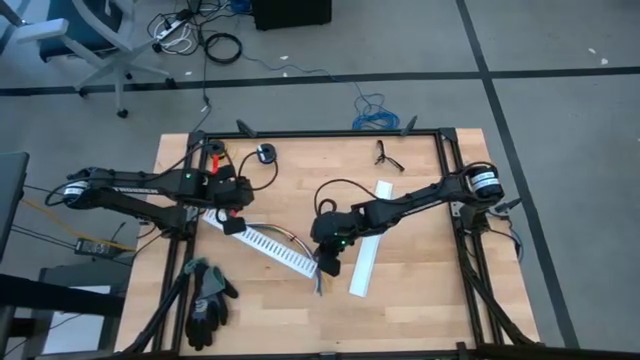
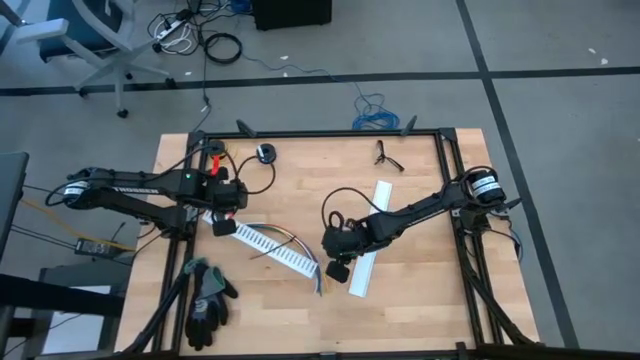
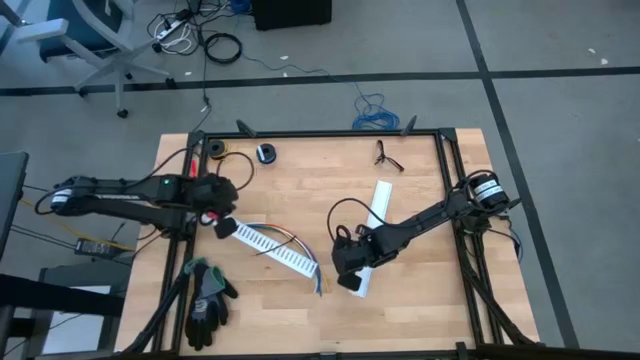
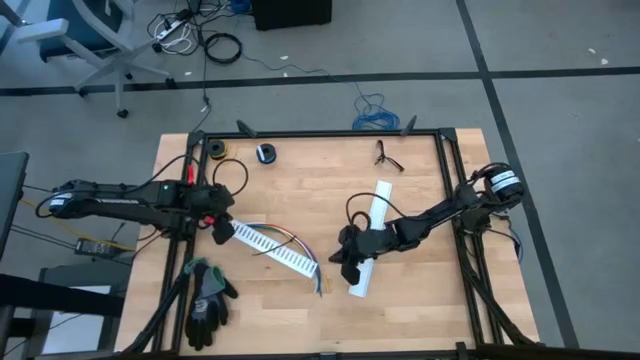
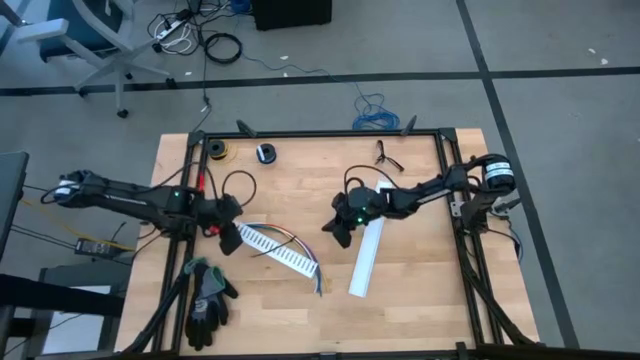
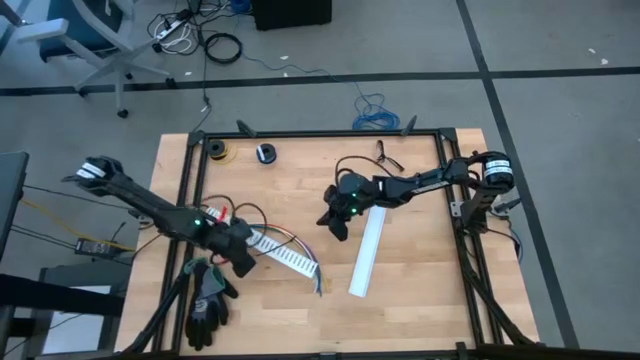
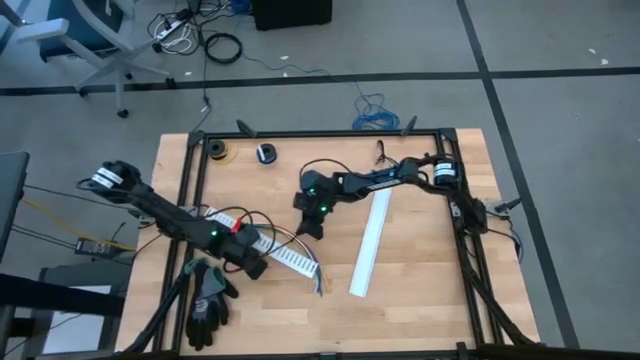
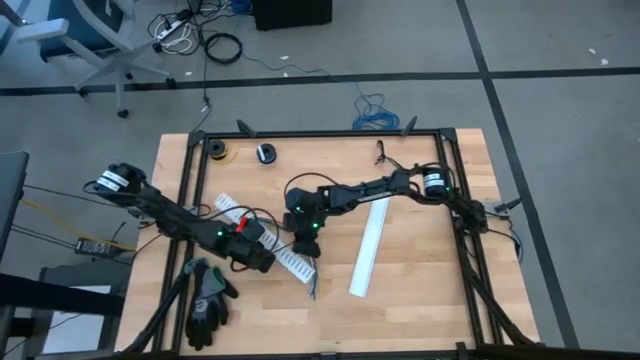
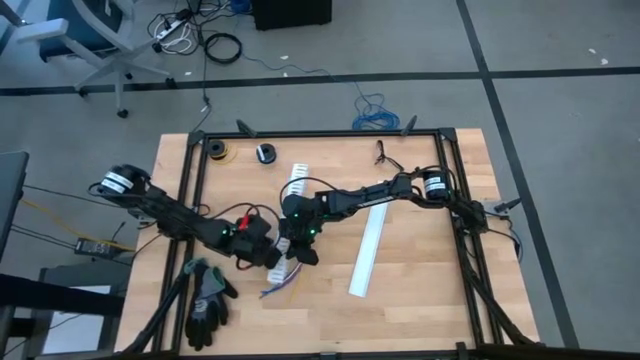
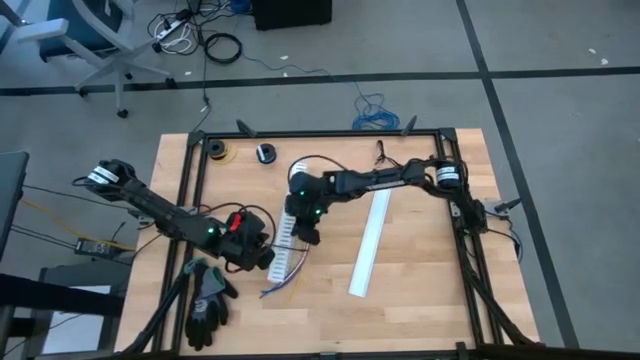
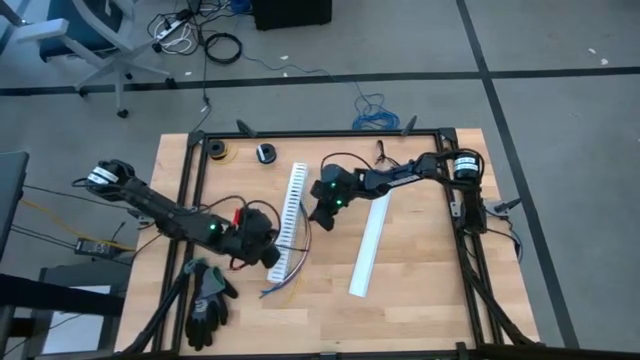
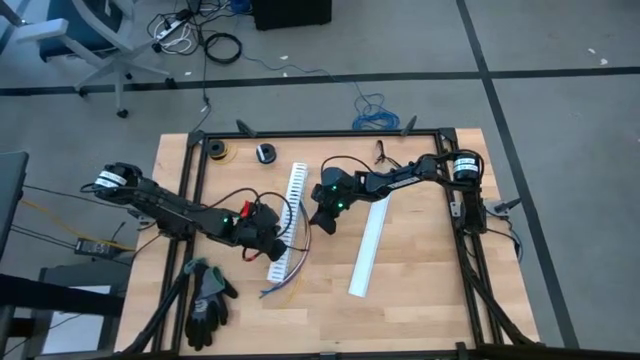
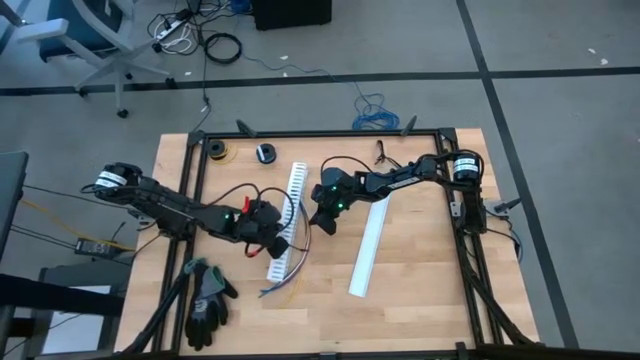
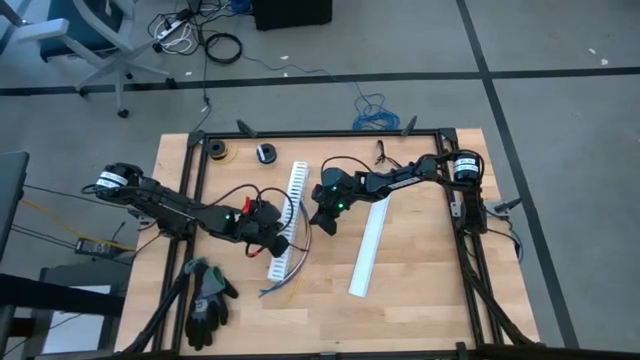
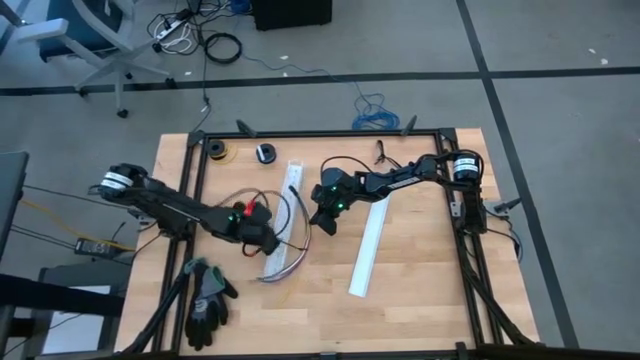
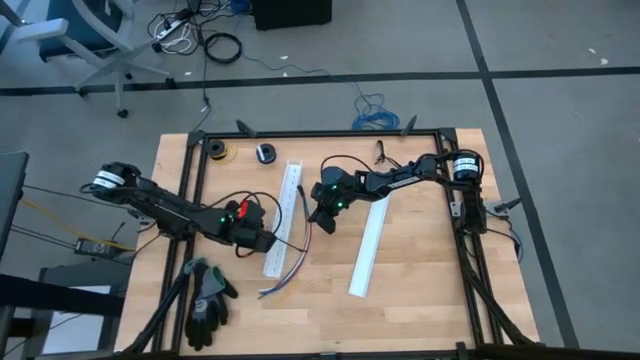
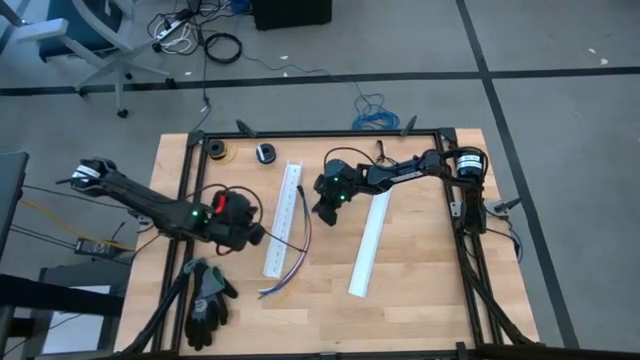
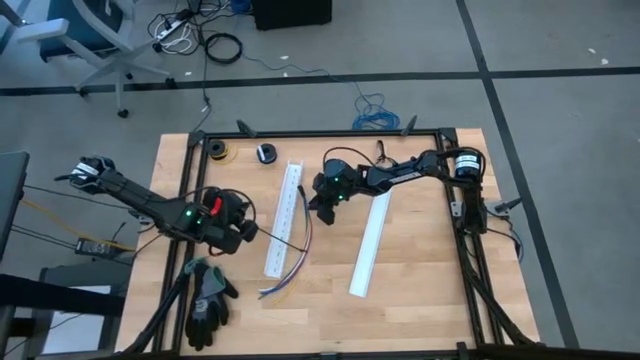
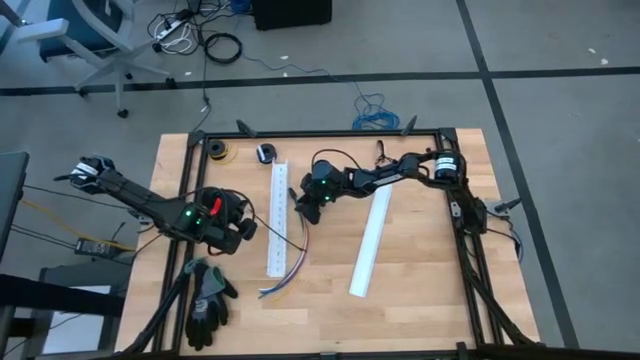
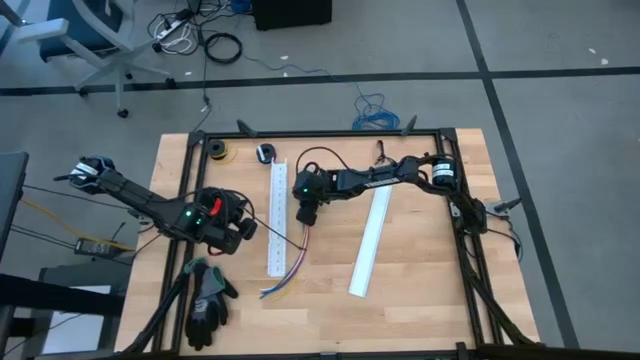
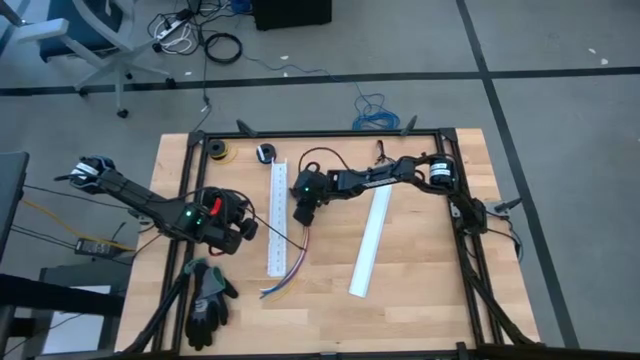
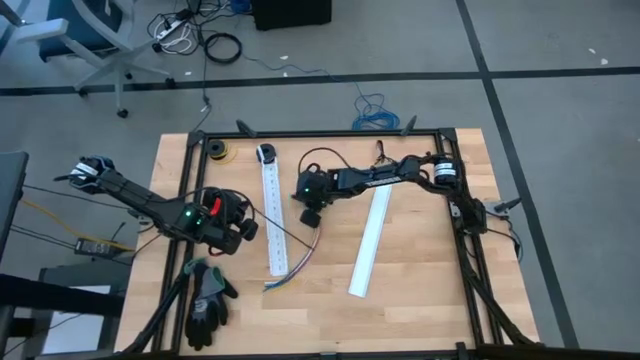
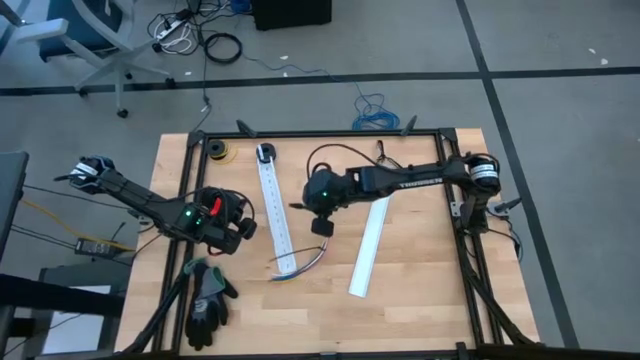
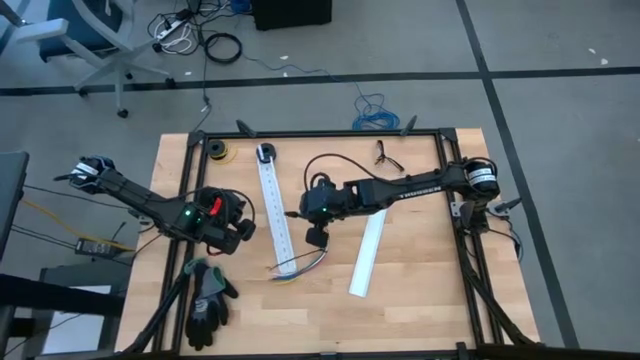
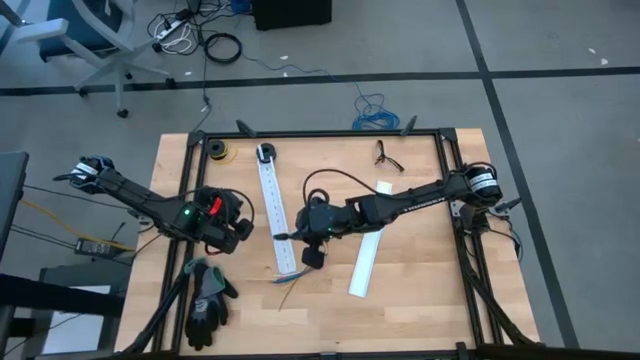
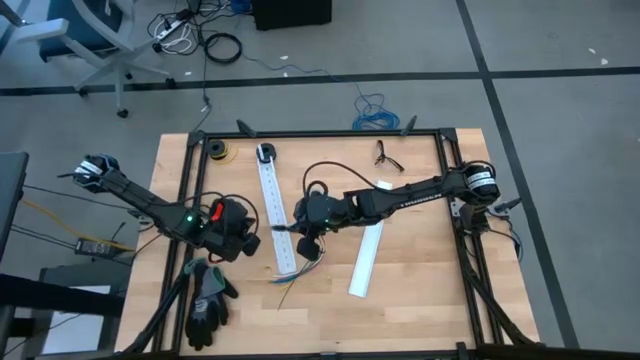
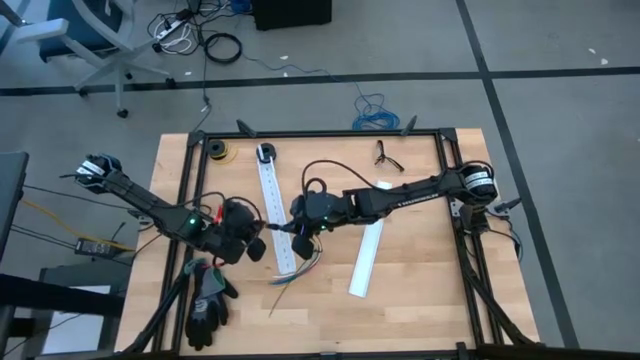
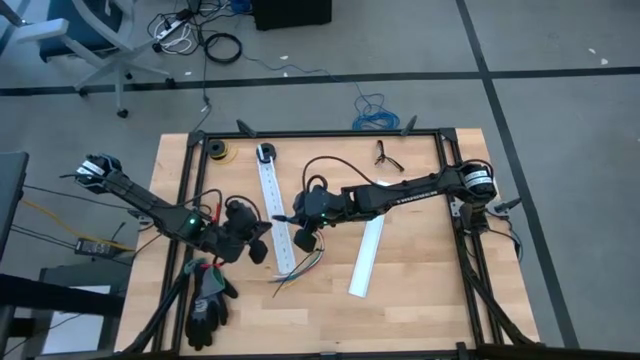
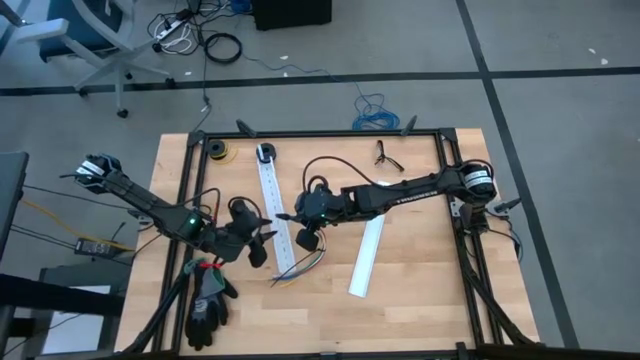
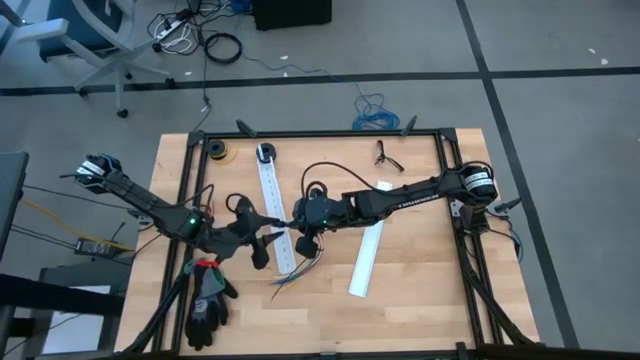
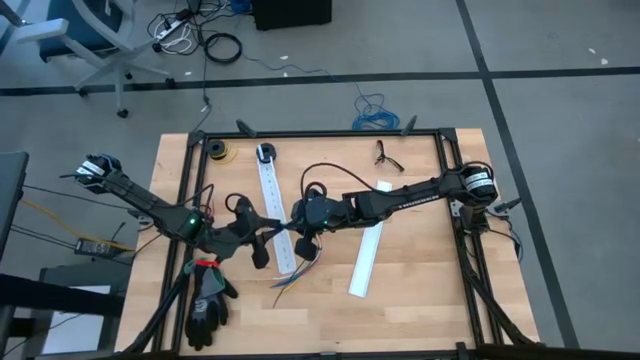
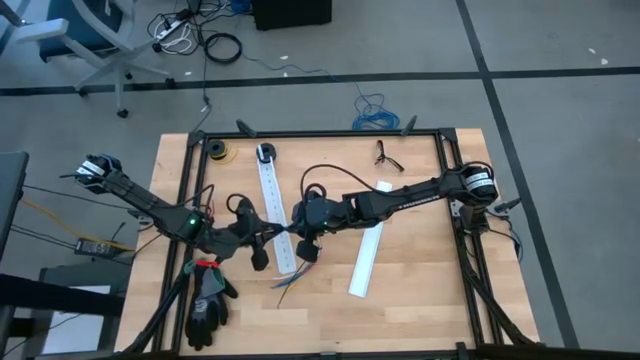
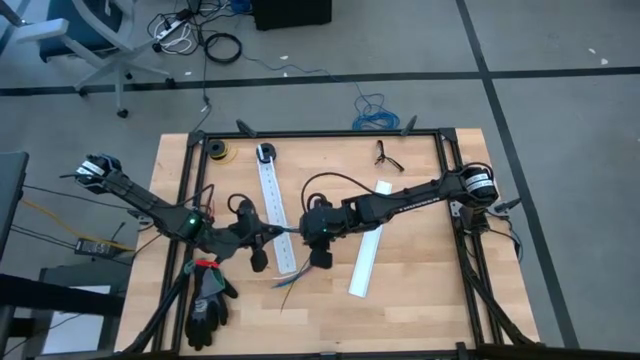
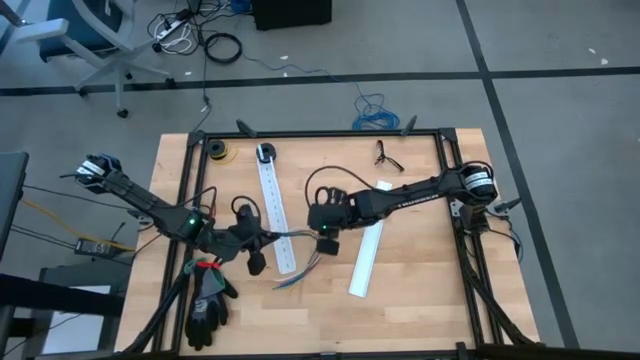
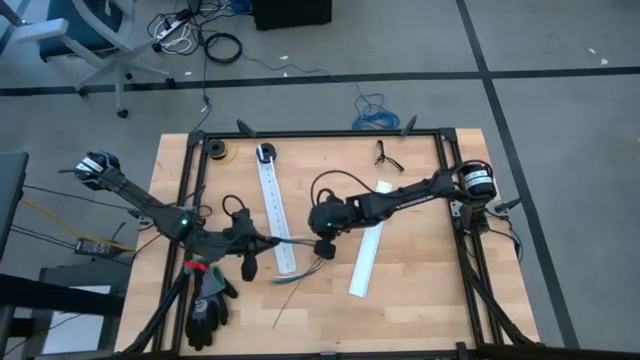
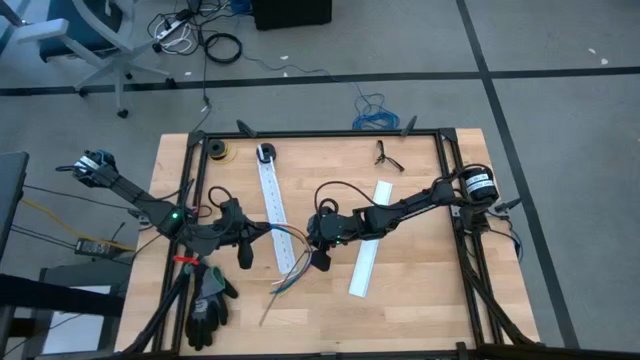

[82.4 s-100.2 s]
Task: Ziptie cables
Put the ziptied cables into the cable duct

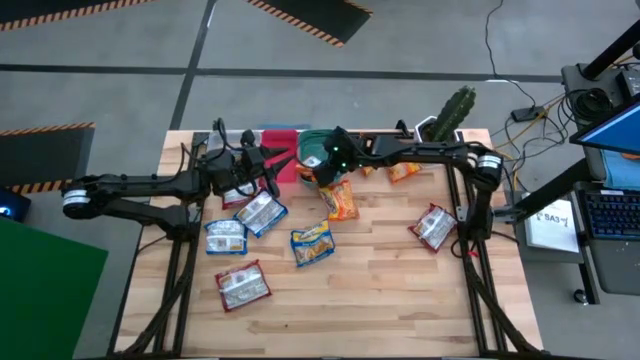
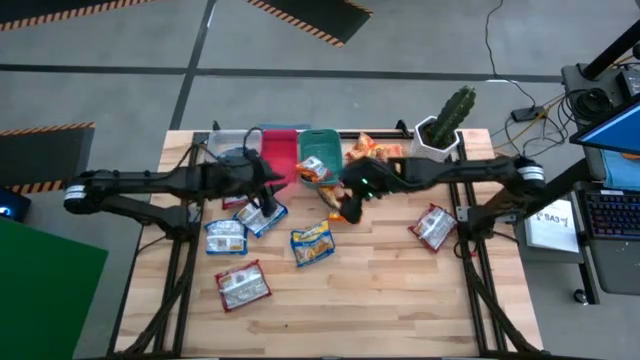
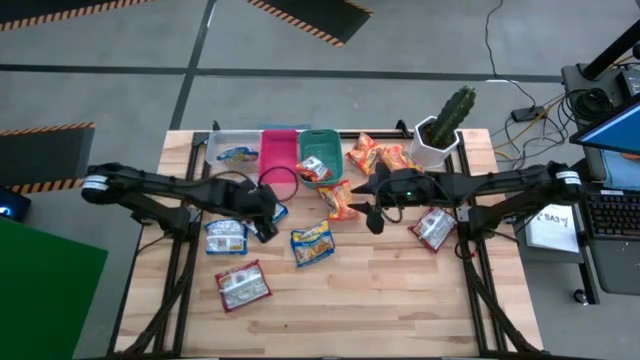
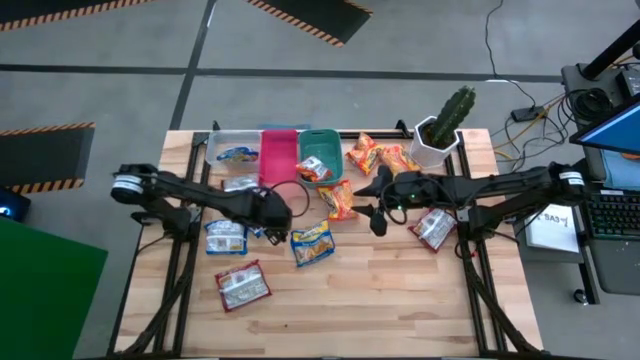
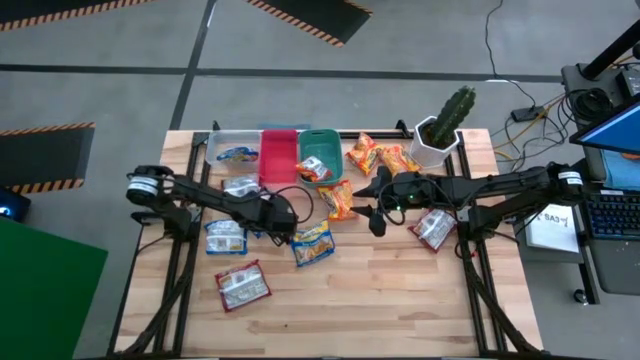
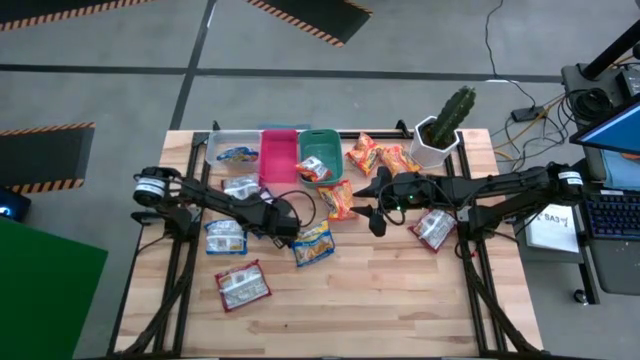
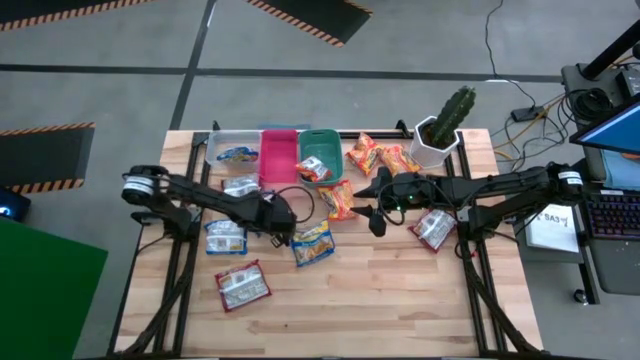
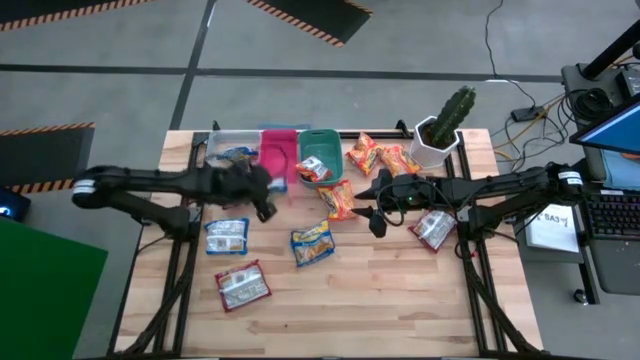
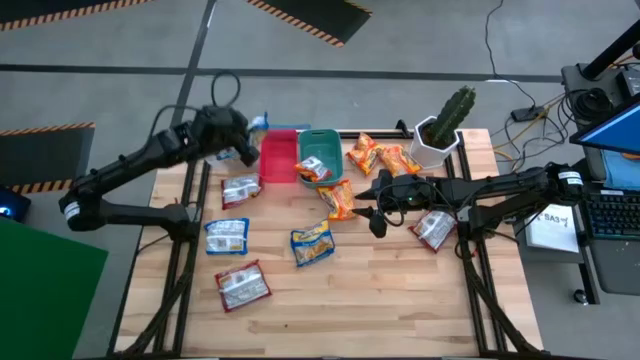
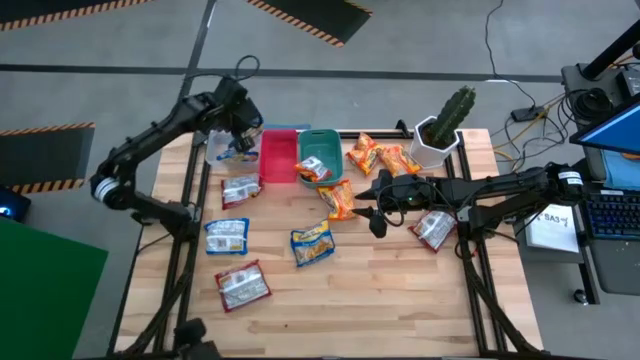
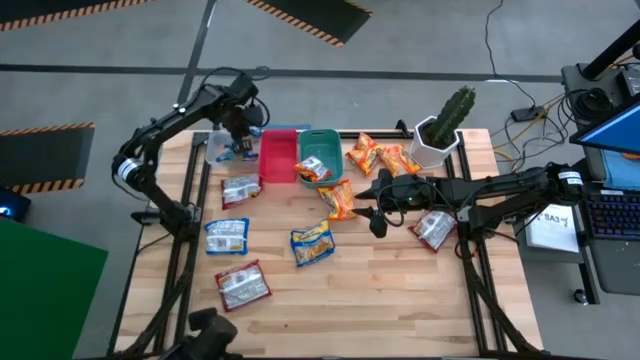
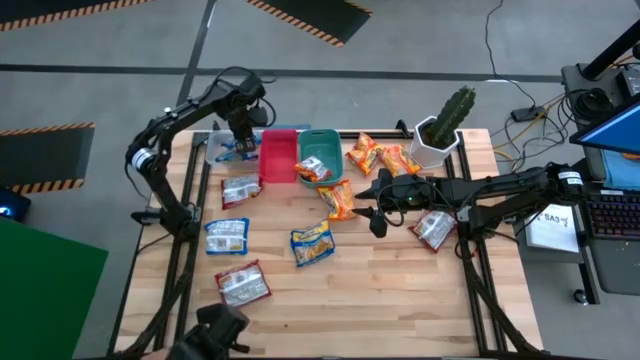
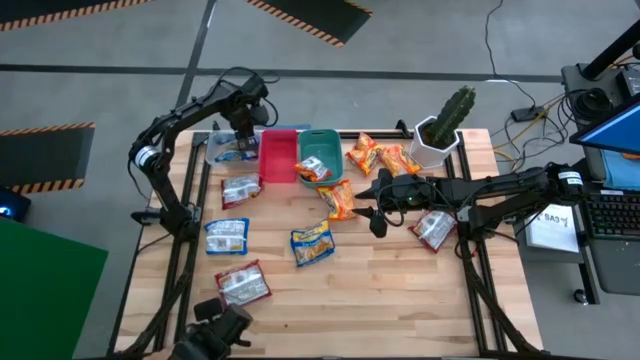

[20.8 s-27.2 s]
Task: Sort Maruchan noodles
Put the blue noodle pack into the transparent bin
